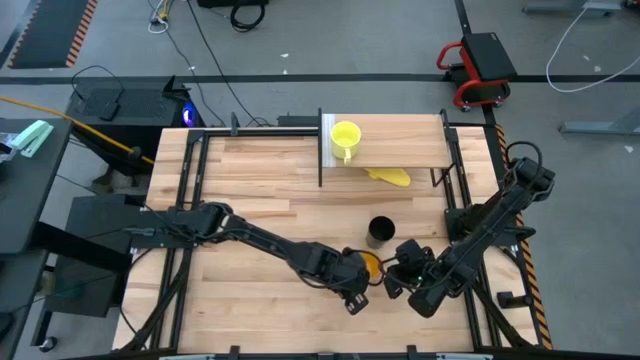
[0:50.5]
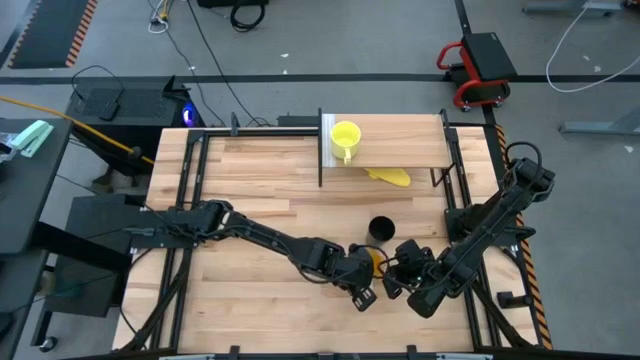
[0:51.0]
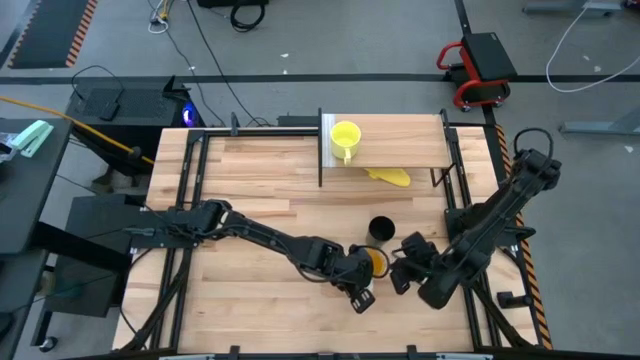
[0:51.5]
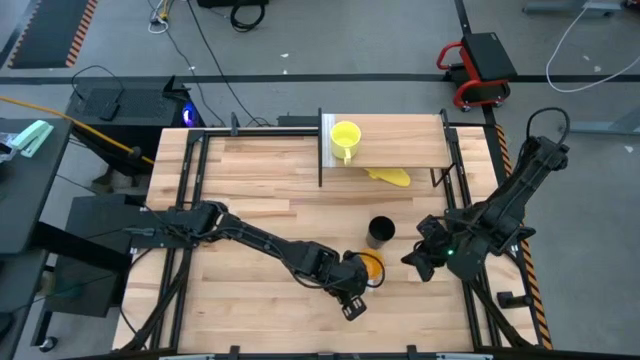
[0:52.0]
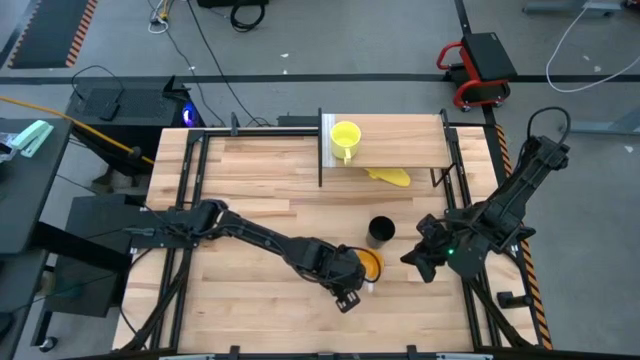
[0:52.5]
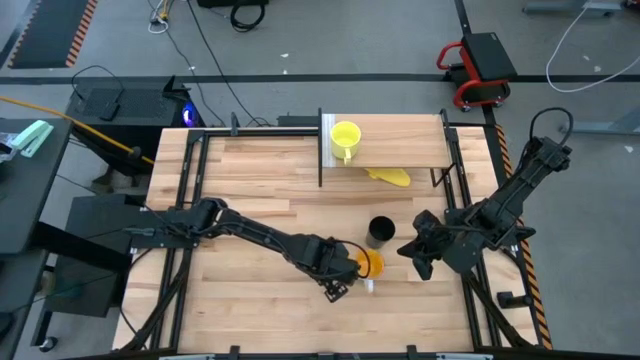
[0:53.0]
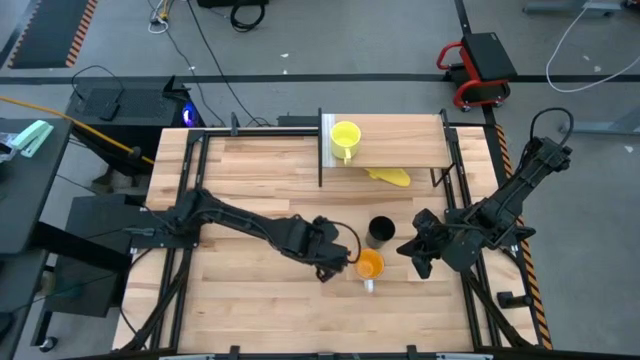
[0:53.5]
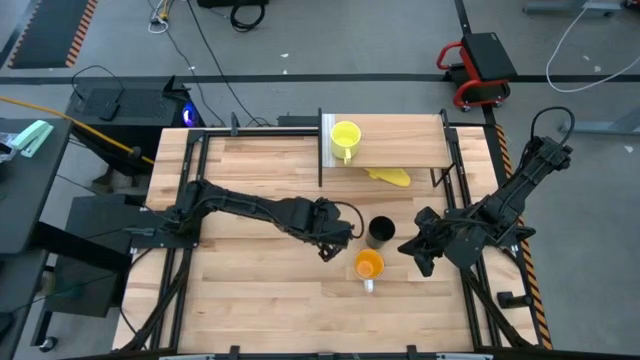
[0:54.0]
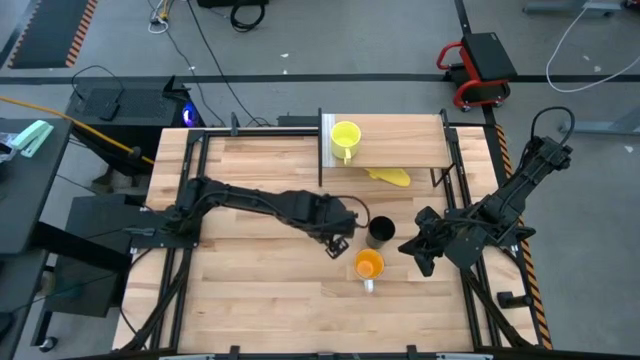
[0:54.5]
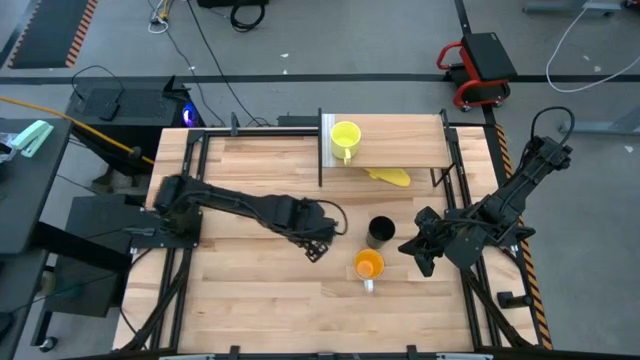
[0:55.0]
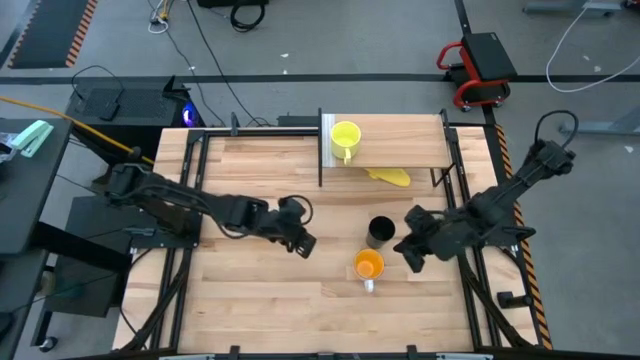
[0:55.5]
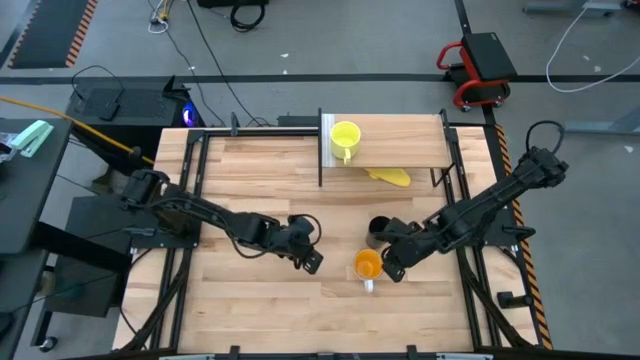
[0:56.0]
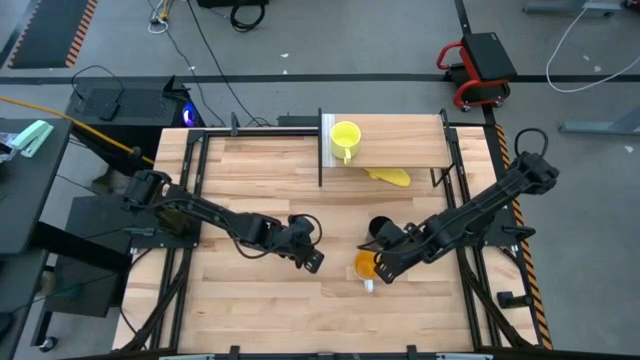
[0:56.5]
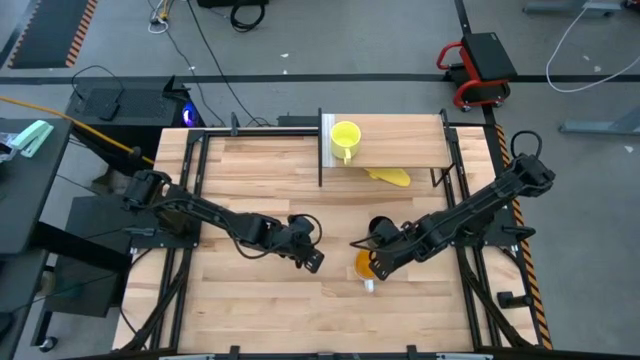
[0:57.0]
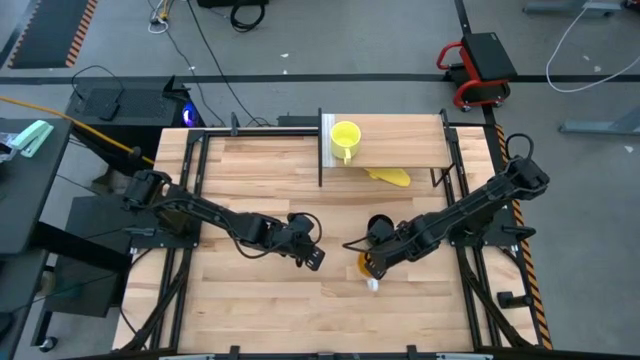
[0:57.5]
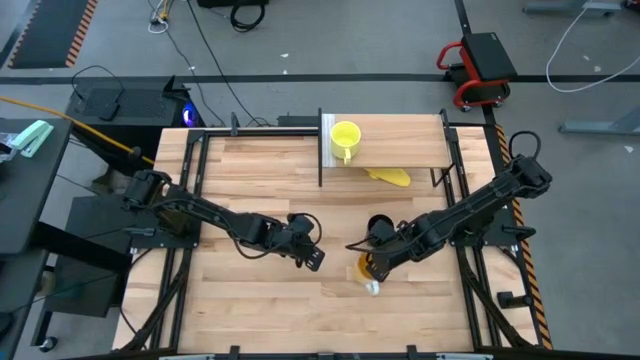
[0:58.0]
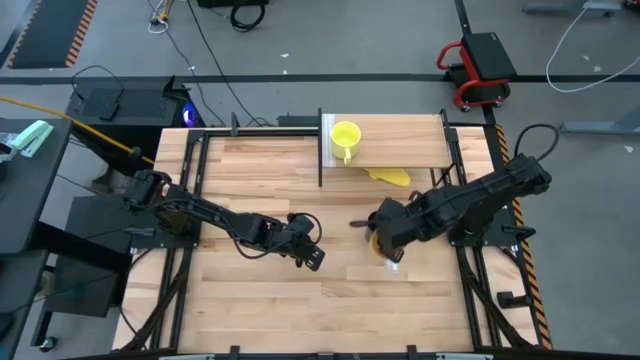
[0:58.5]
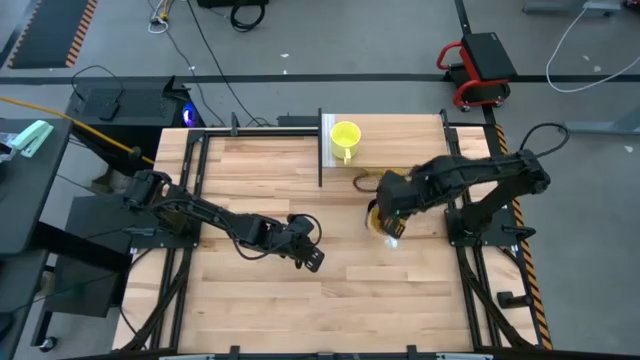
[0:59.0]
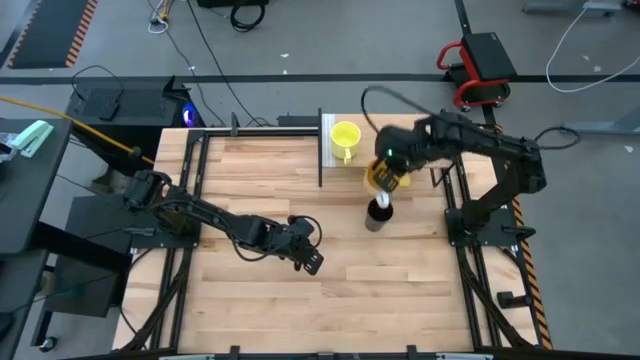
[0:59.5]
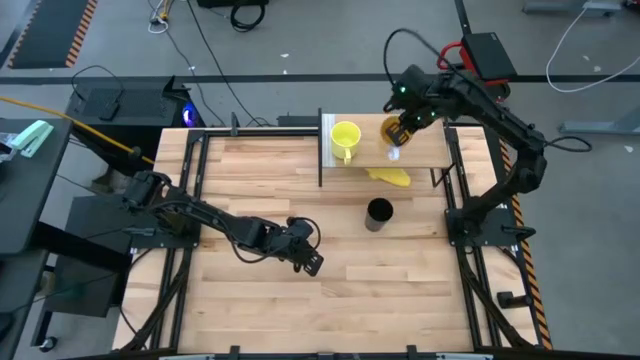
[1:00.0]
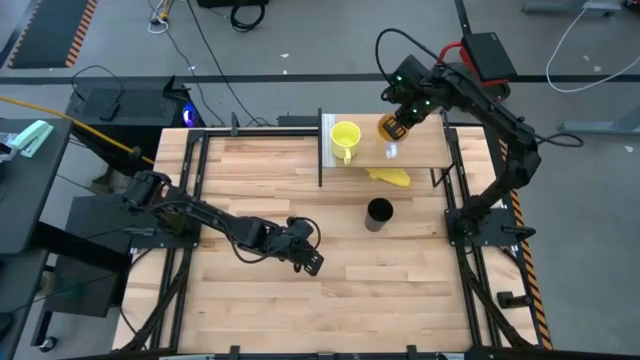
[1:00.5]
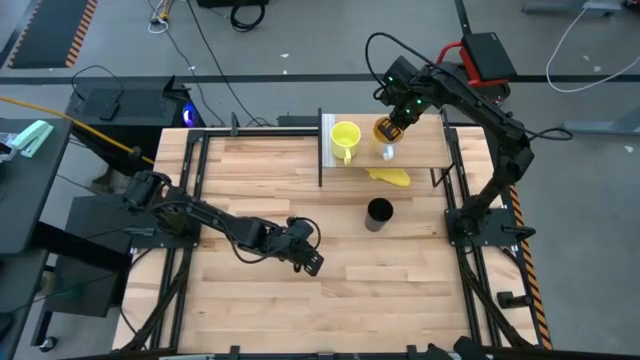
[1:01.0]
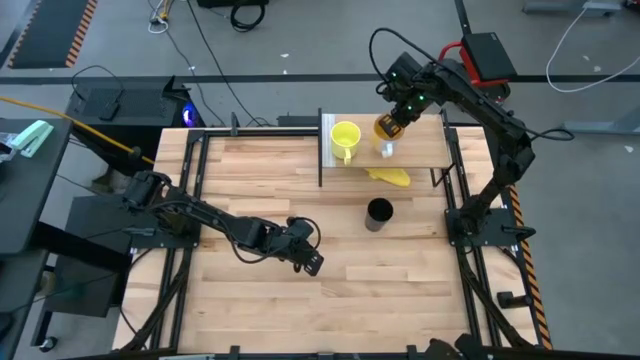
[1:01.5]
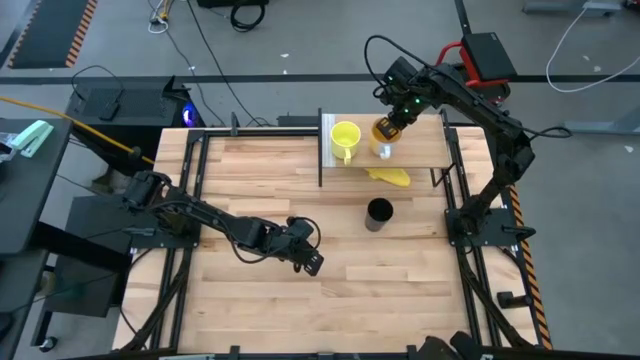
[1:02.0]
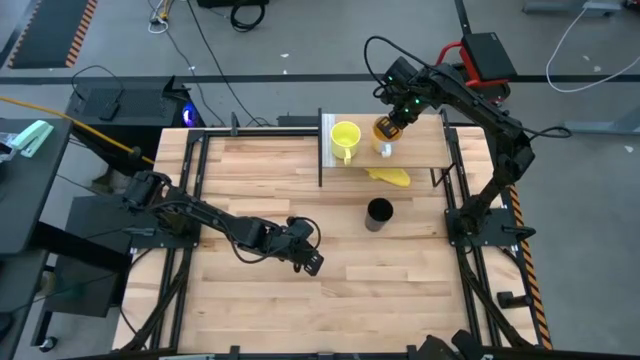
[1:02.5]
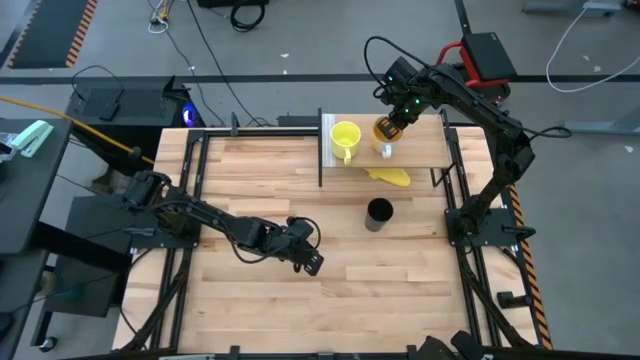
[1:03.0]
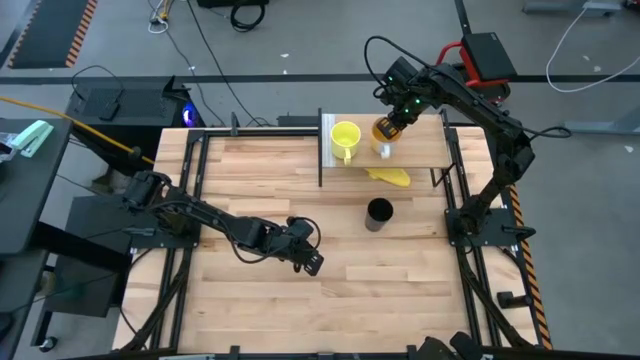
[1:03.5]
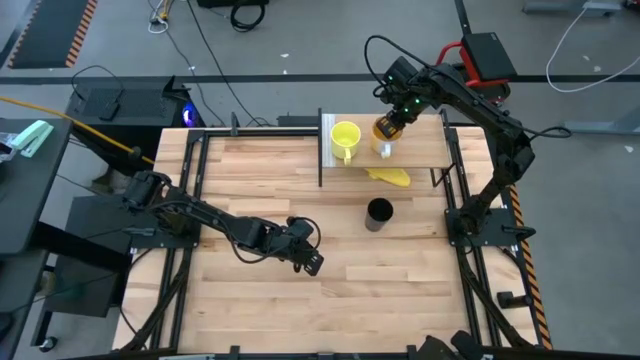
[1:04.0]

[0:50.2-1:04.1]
Task: Stack small to large cups/mugs on shelf
Put the orange mug on the shelf

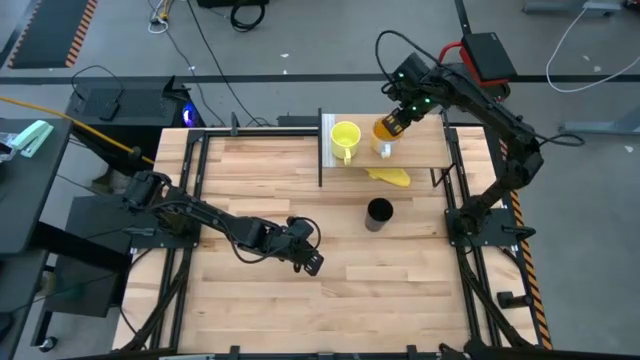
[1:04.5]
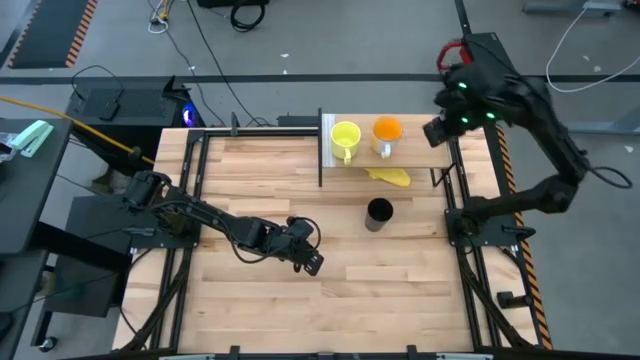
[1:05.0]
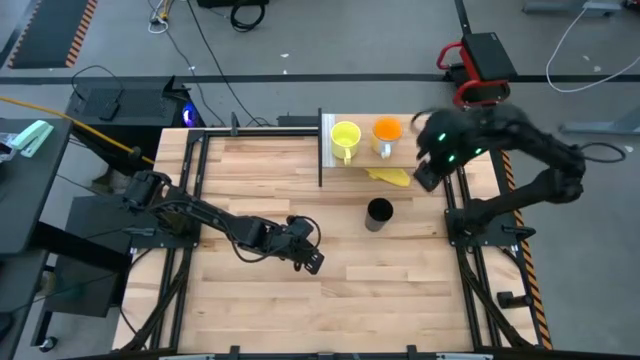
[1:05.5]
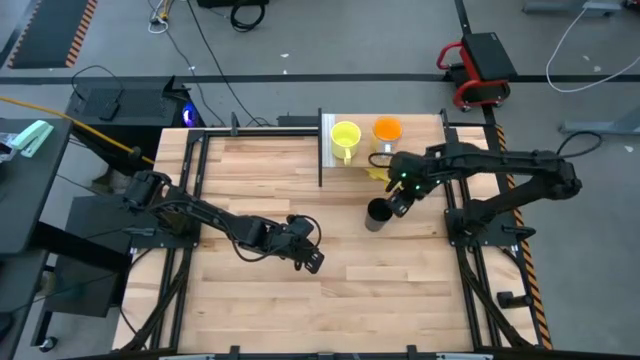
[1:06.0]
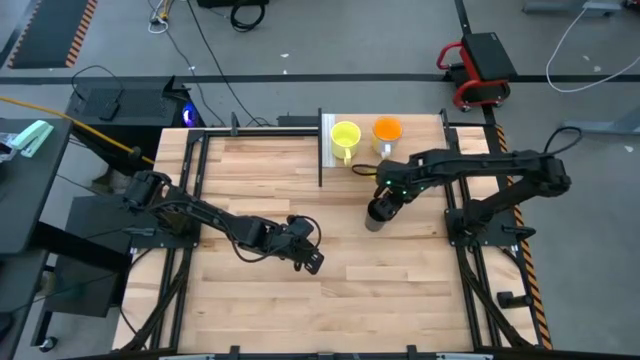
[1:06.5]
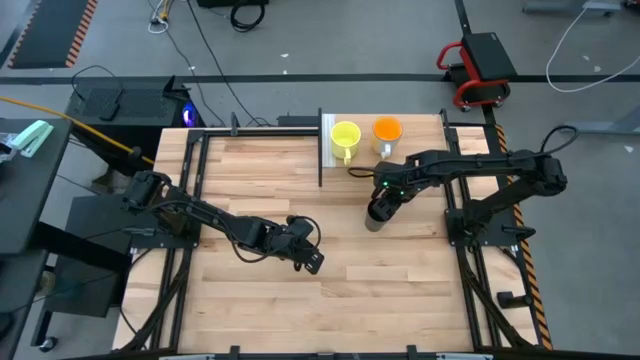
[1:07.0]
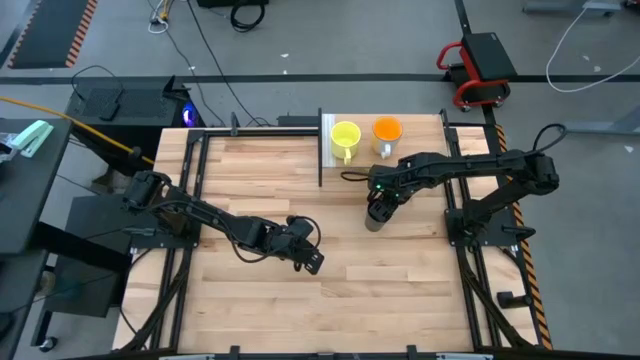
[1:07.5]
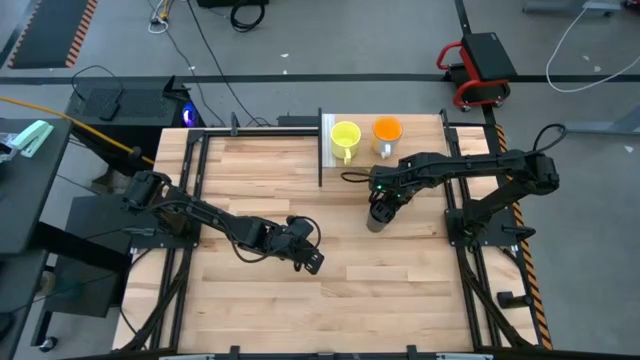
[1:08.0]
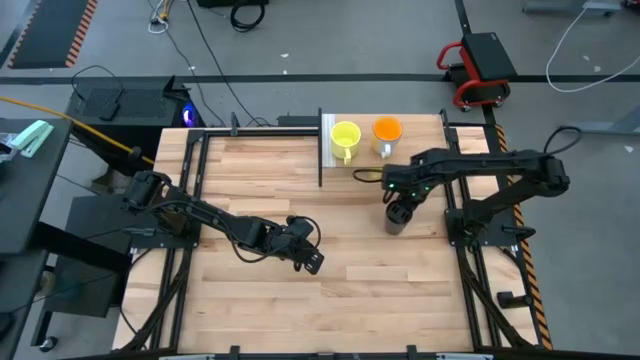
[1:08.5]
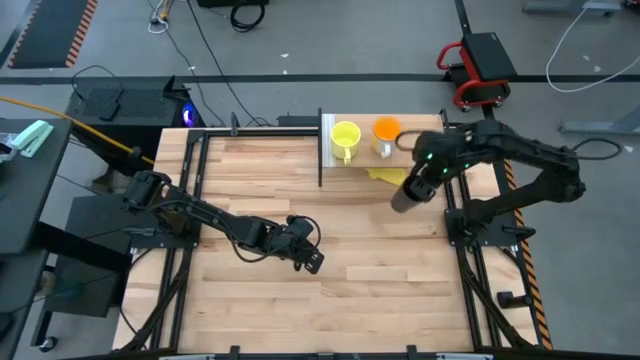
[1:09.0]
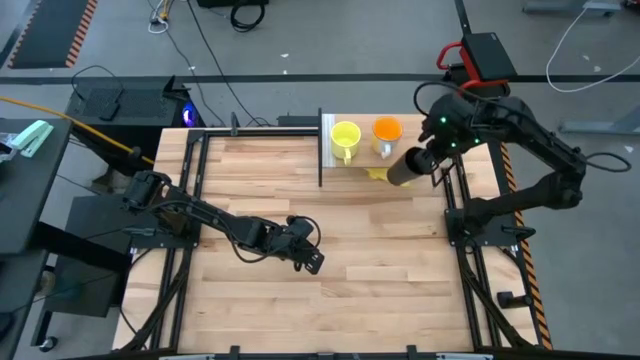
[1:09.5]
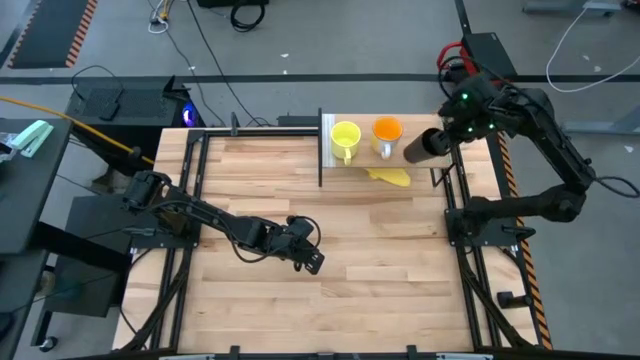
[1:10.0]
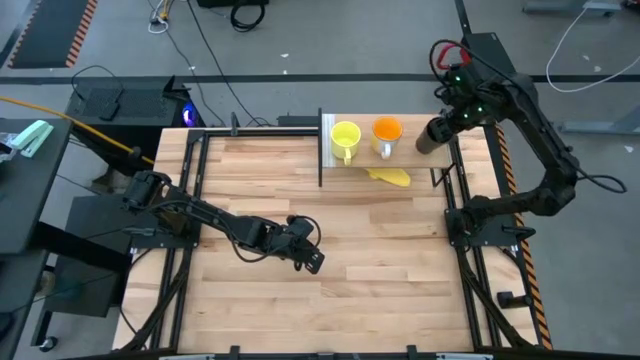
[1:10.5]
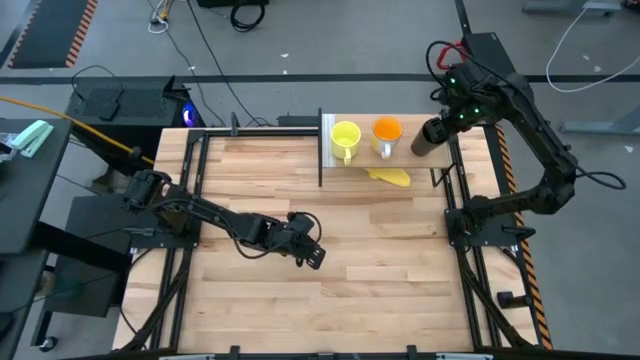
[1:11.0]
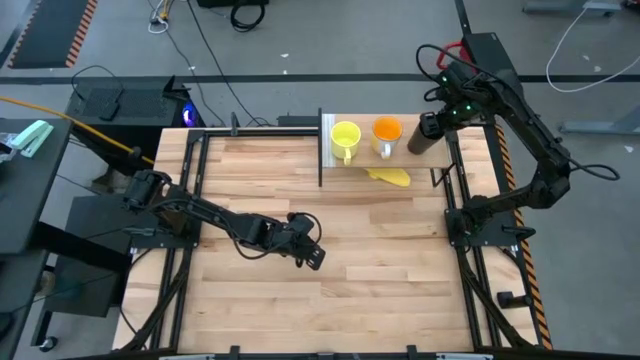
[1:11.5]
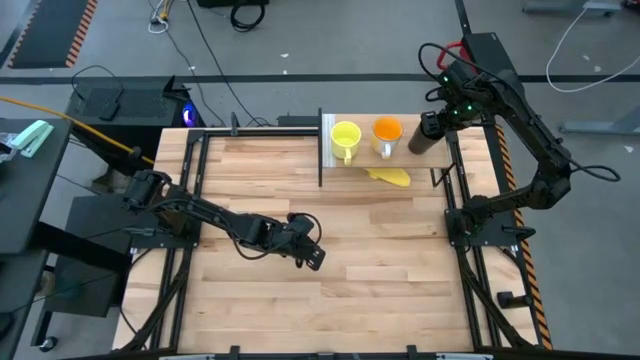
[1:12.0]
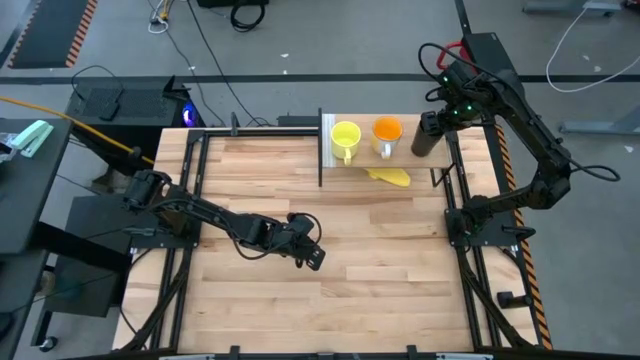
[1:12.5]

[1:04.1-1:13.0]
Put the black cup on the shelf
